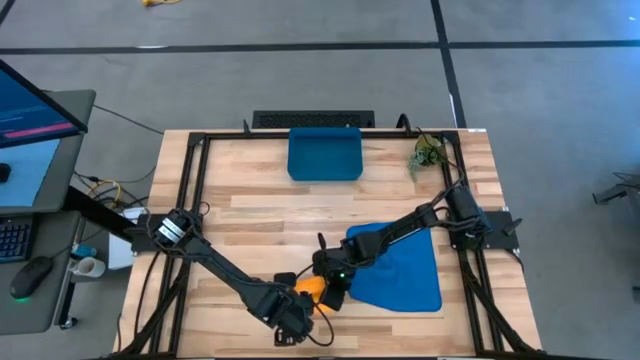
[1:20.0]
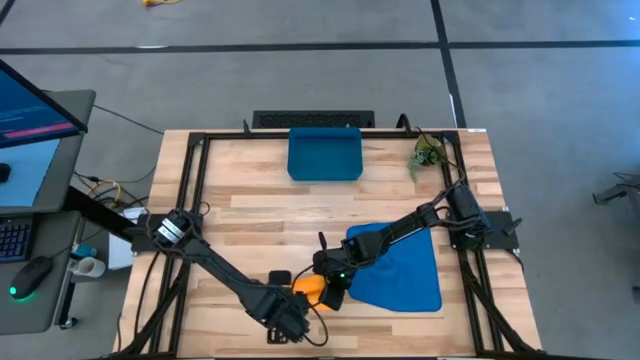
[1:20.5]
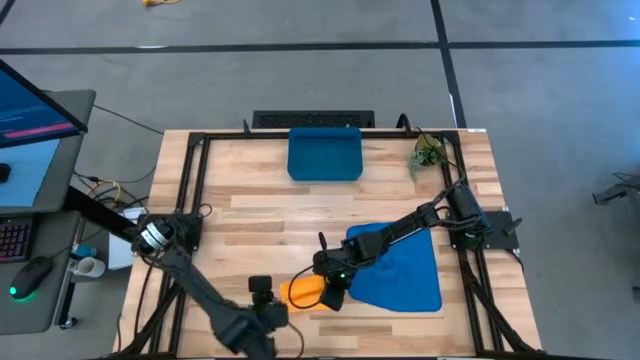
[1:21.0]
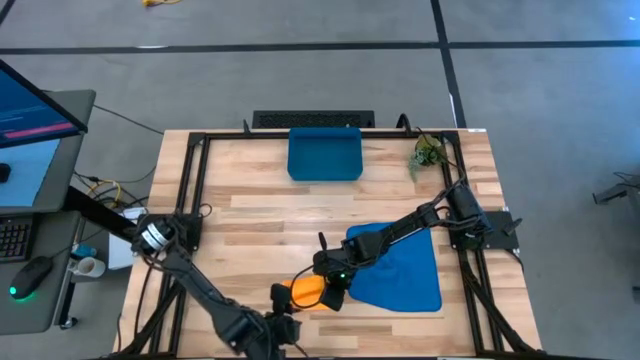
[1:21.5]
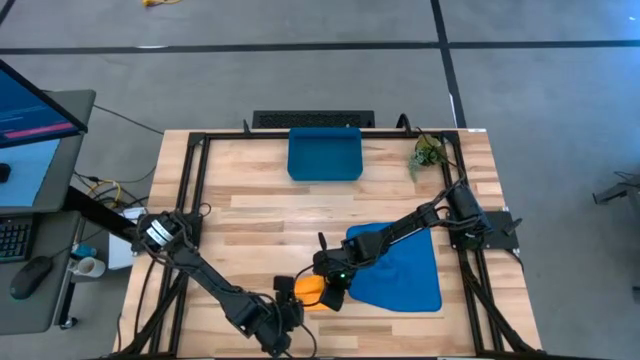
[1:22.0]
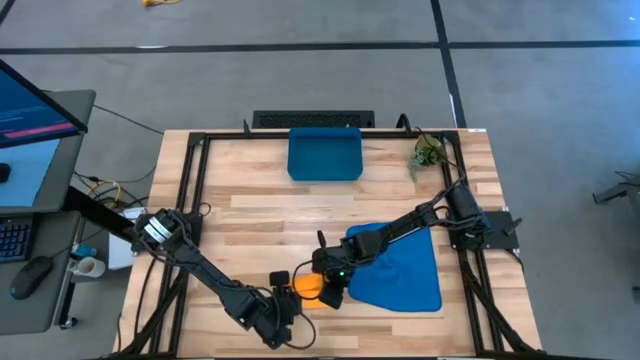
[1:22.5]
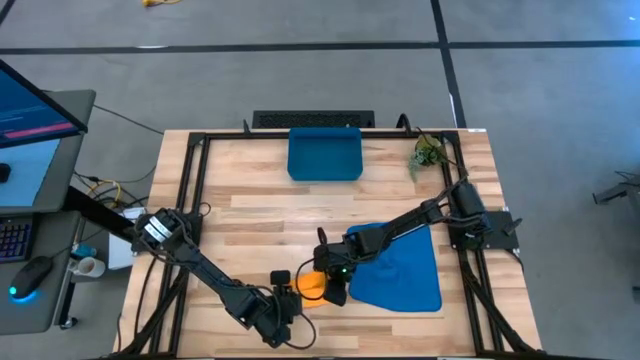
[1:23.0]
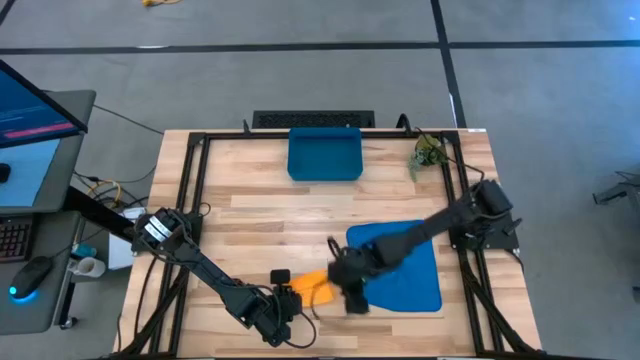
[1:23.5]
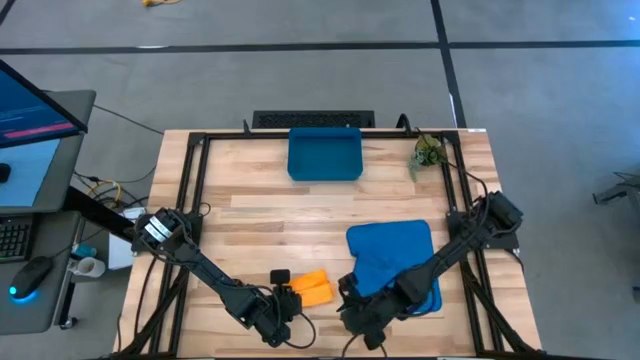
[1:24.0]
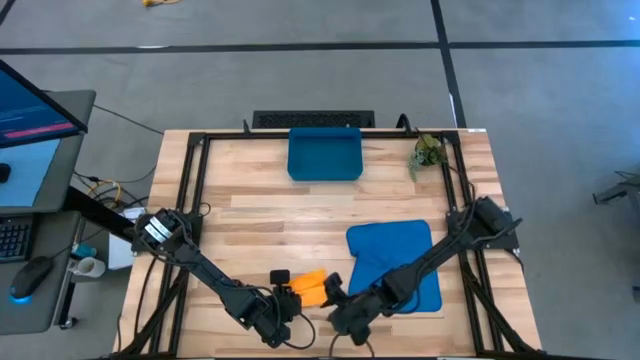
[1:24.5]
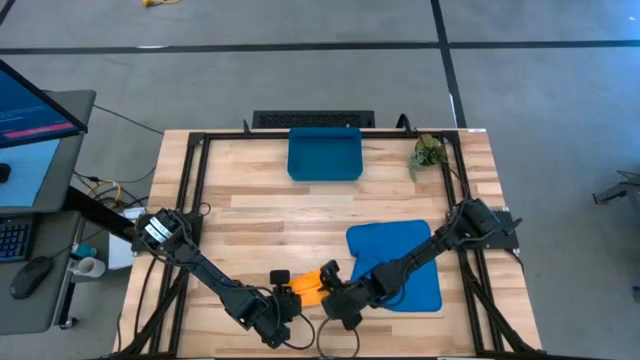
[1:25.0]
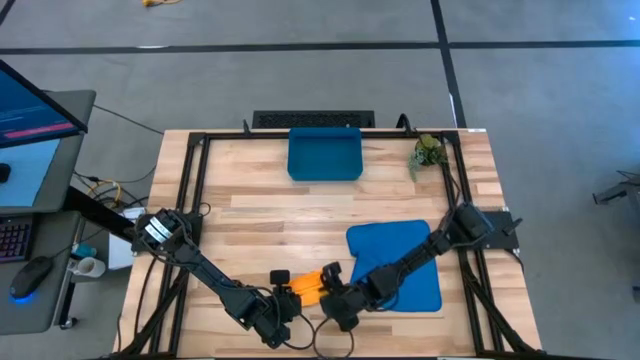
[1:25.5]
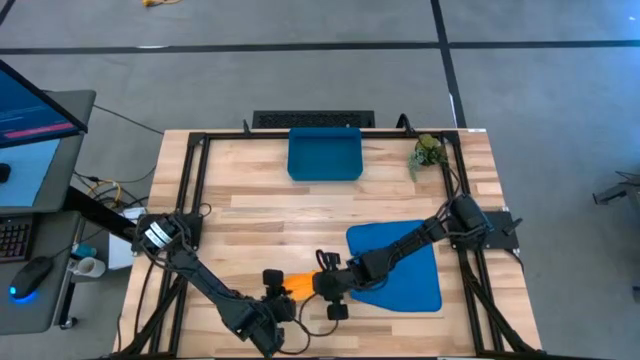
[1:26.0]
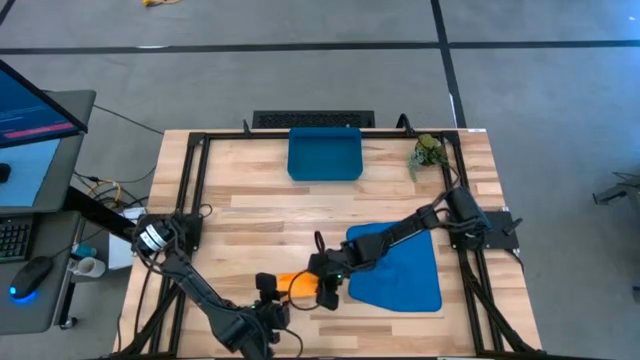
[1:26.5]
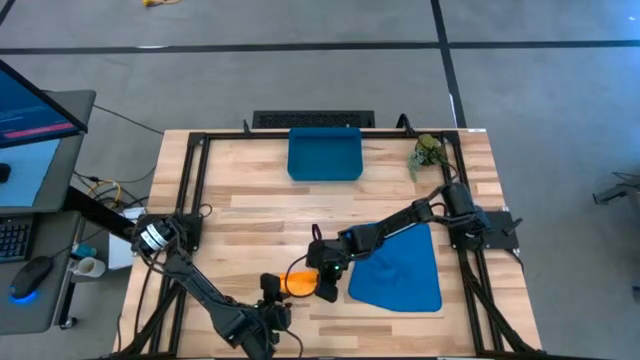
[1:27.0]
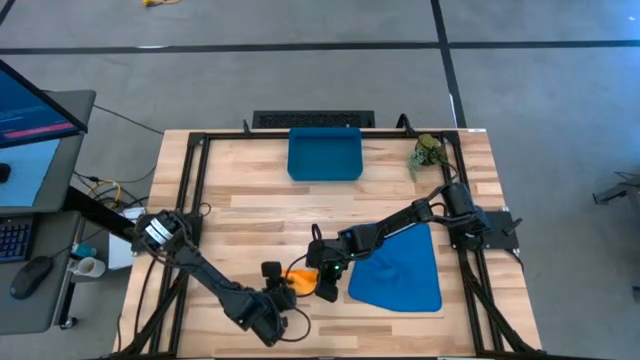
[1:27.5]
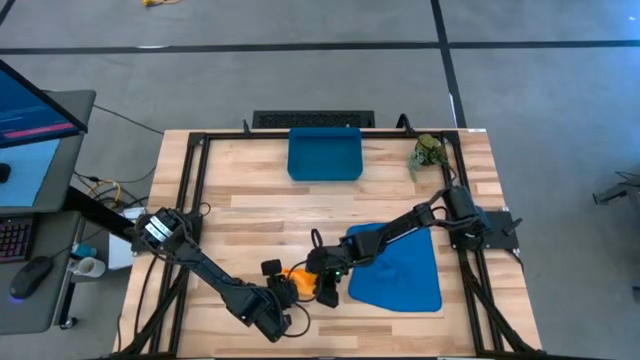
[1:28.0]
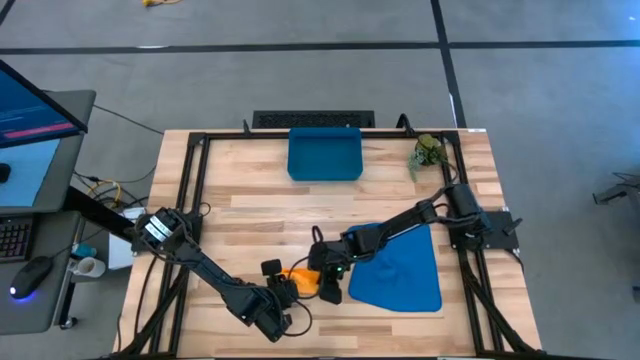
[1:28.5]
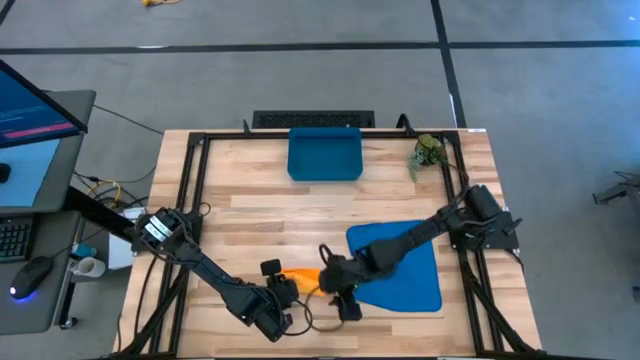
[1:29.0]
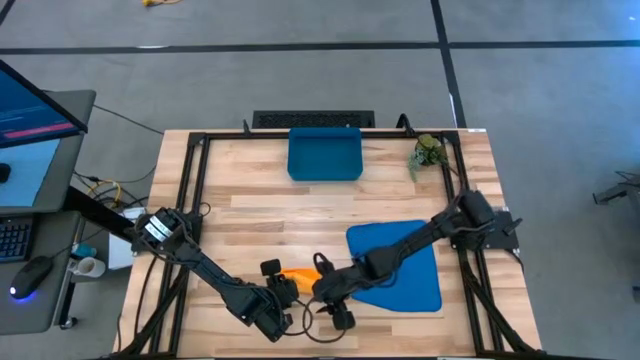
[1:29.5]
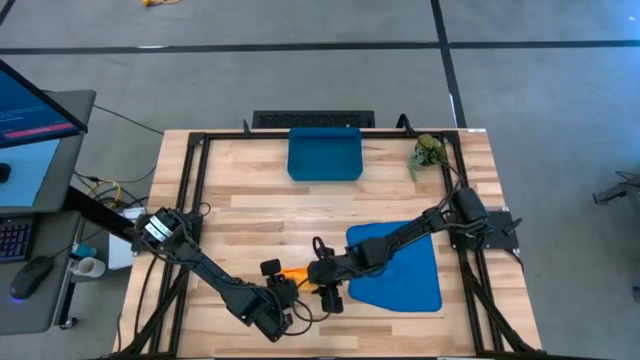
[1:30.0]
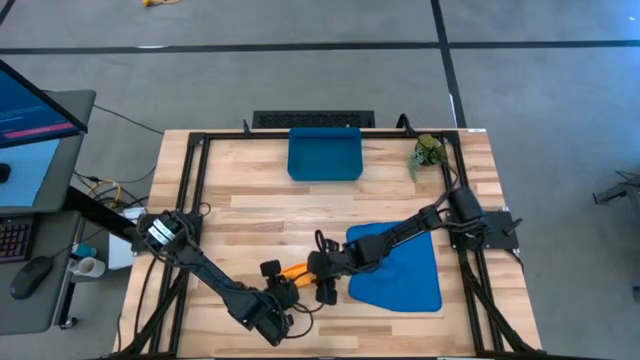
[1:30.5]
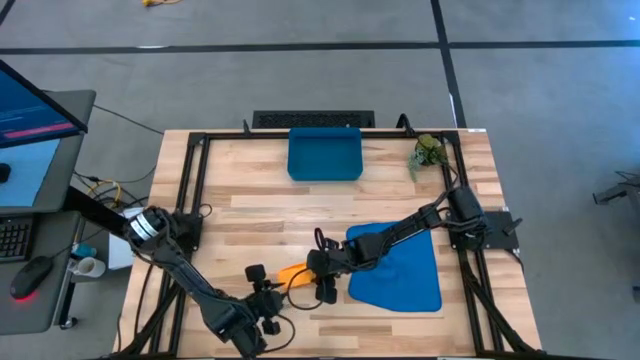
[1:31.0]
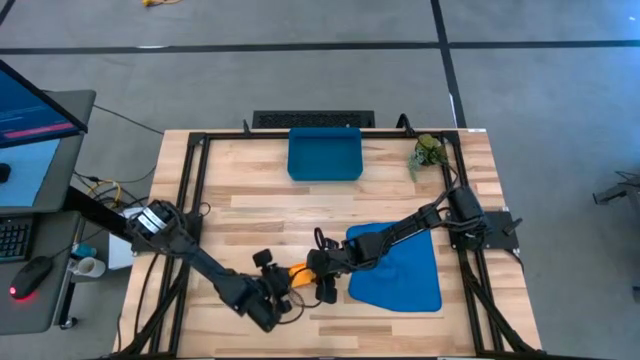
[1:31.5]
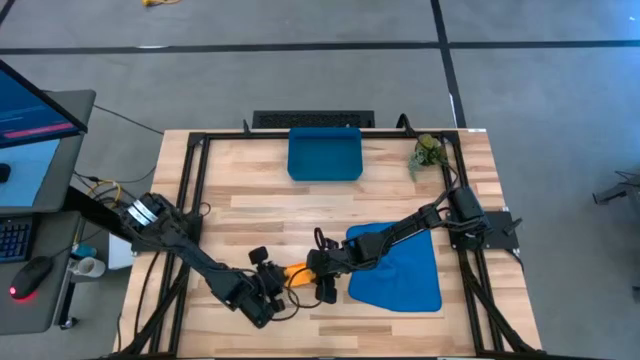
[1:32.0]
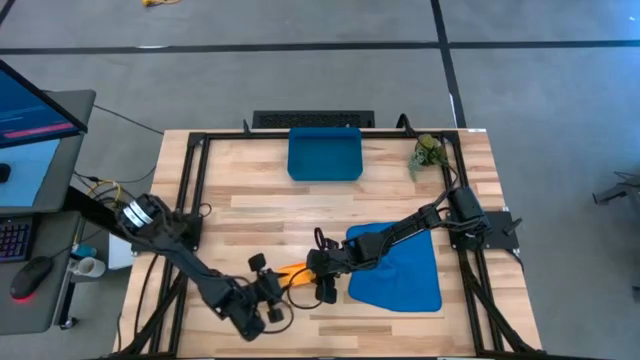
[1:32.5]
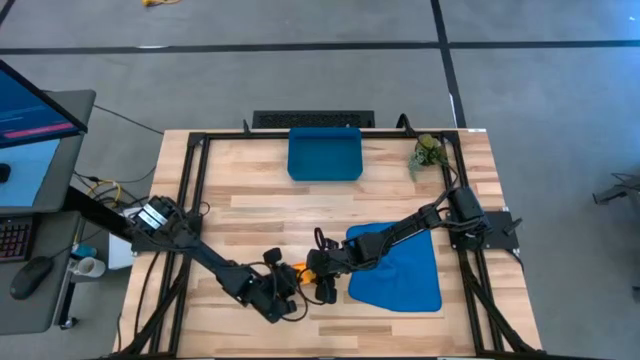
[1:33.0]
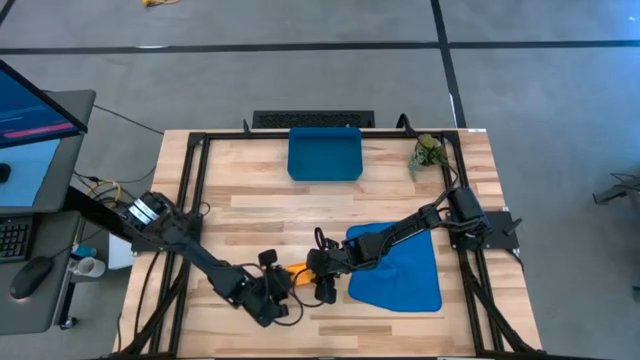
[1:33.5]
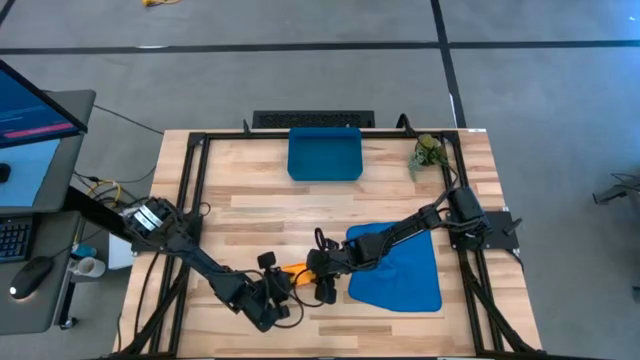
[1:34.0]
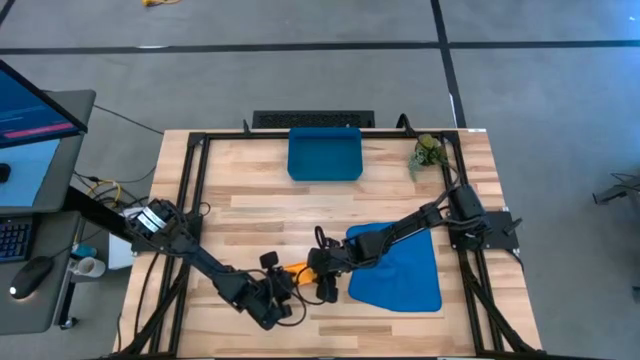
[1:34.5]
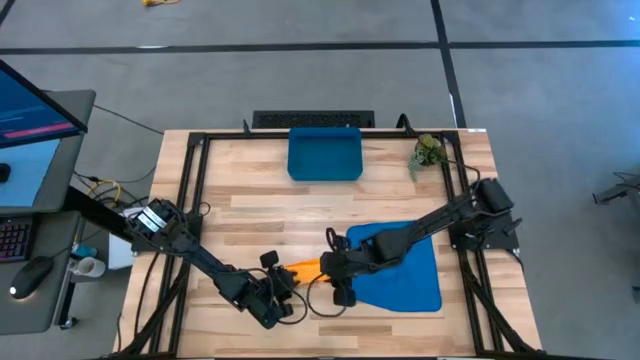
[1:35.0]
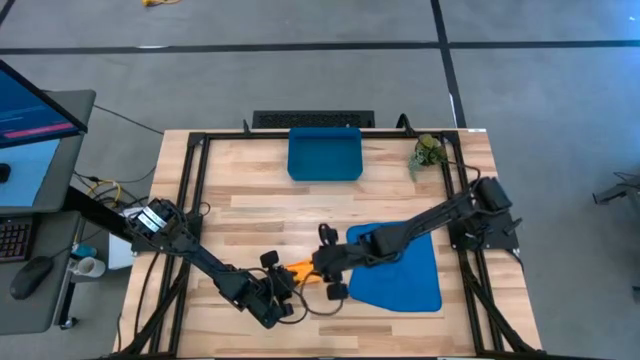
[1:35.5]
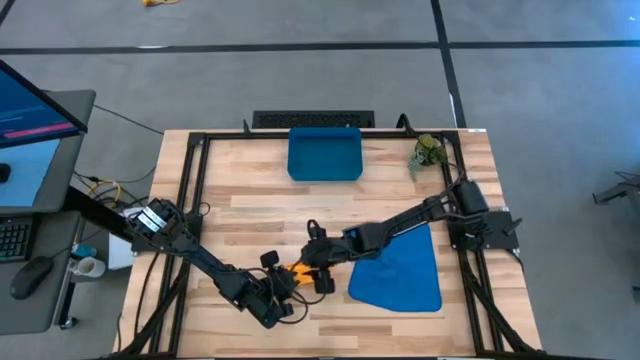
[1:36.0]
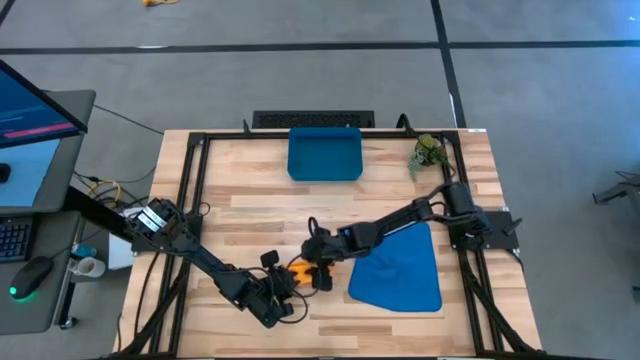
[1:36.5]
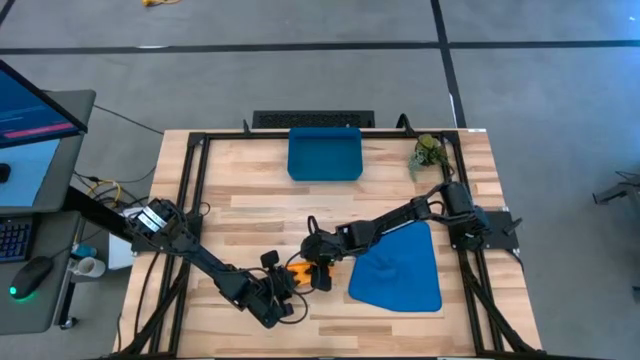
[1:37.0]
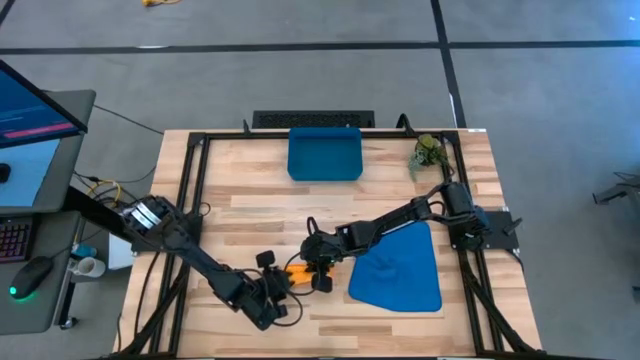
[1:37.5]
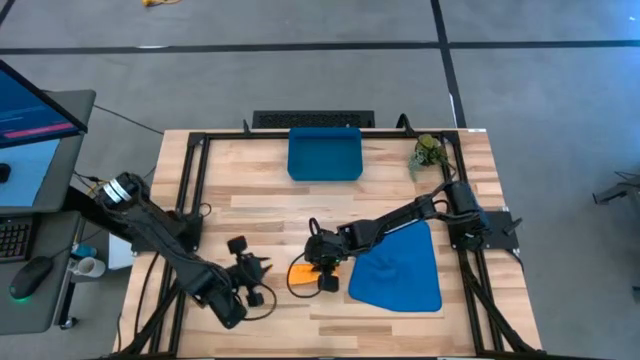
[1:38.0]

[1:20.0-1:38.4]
Task: Roll microfiber towels into tight, uniform cylinder then place into a basket
Roll the yellow microfiber cloth

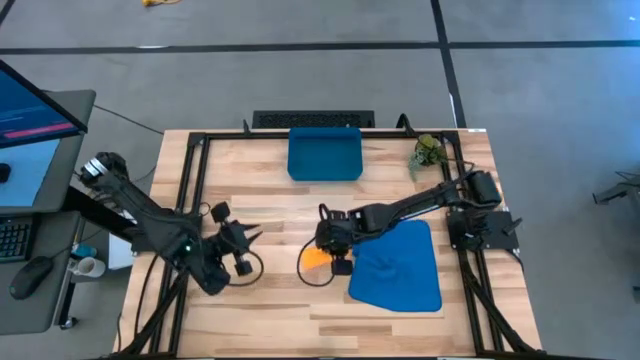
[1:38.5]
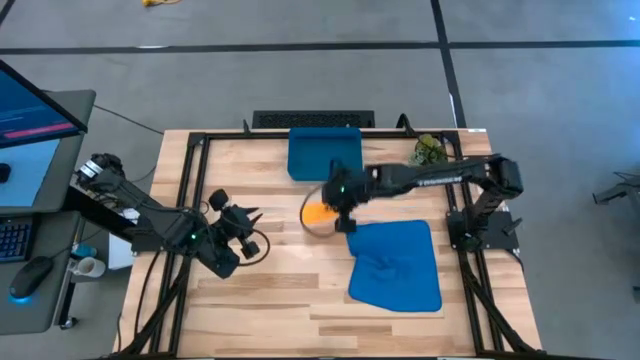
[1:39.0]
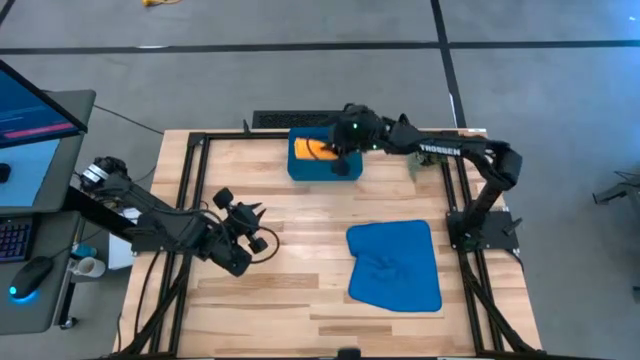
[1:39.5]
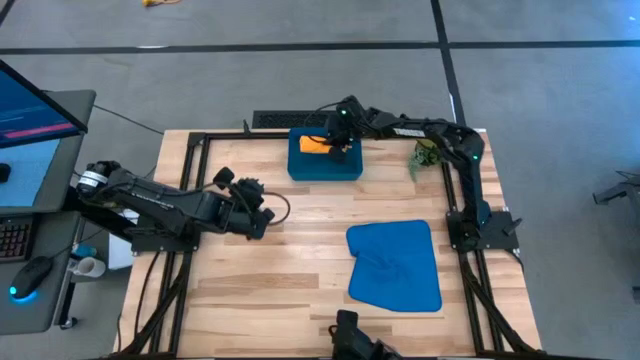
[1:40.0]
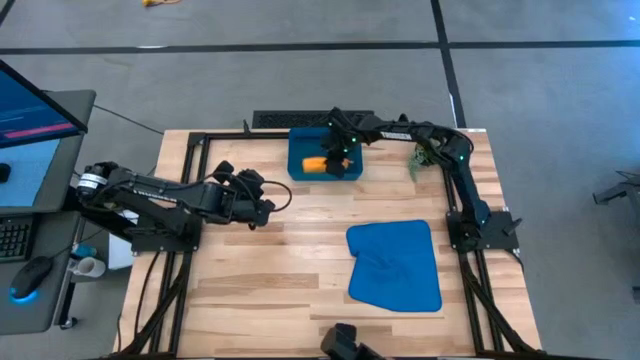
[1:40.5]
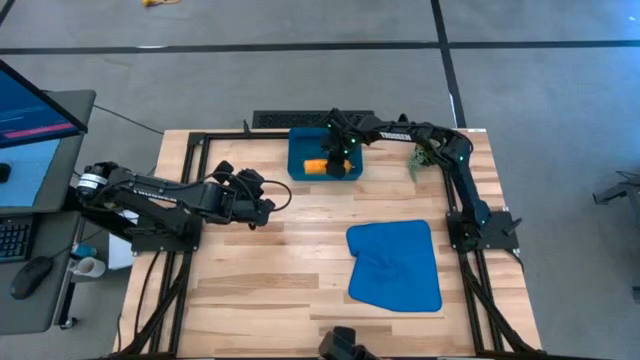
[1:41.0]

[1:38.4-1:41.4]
Put the yellow microfiber towel into the blue bin
